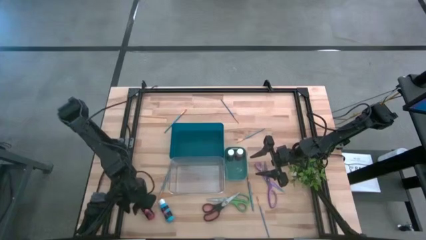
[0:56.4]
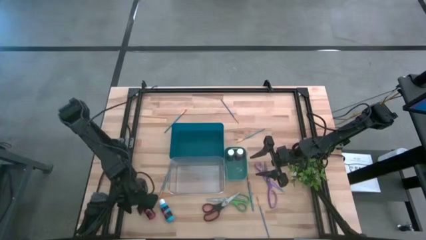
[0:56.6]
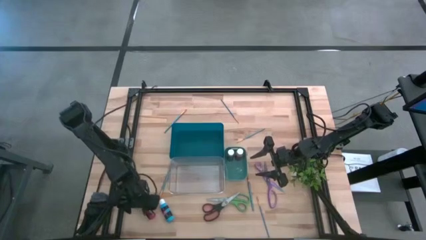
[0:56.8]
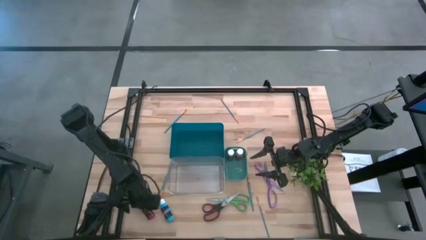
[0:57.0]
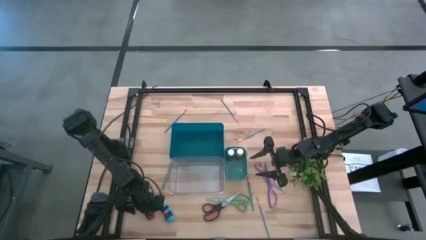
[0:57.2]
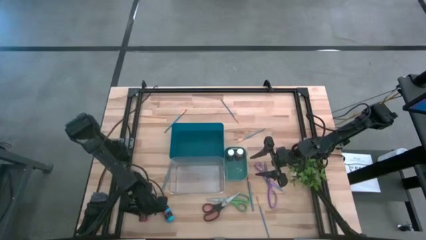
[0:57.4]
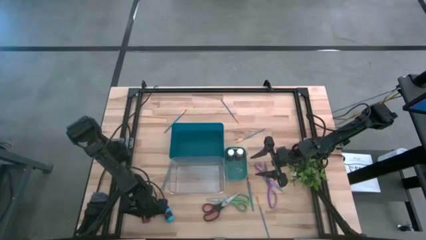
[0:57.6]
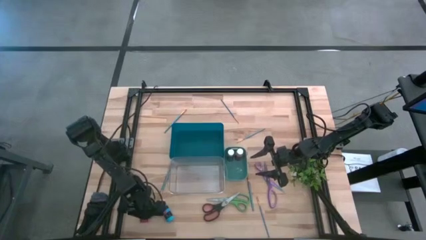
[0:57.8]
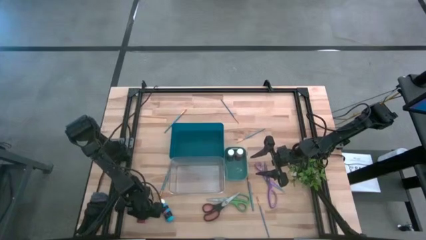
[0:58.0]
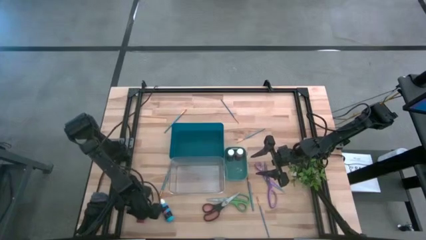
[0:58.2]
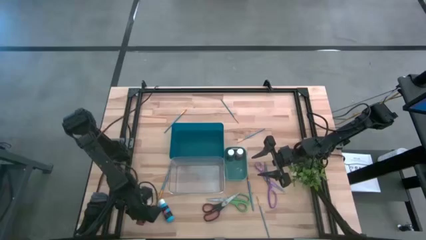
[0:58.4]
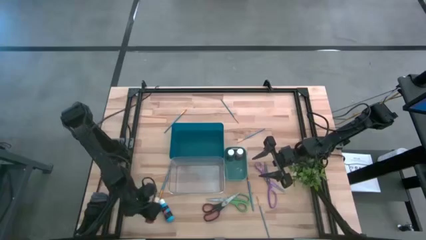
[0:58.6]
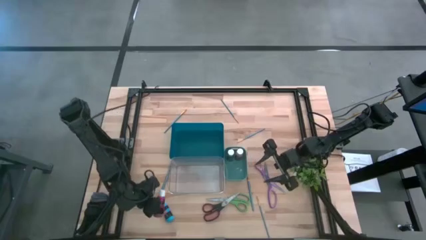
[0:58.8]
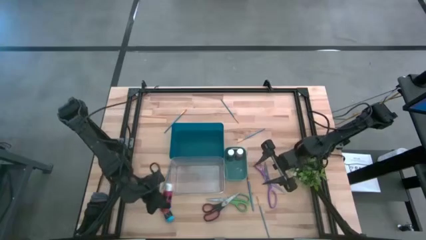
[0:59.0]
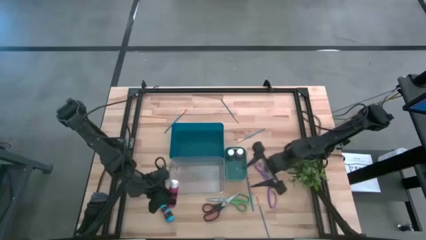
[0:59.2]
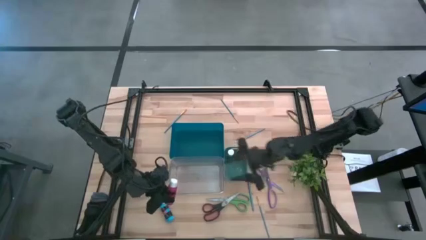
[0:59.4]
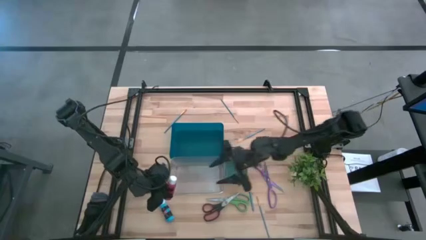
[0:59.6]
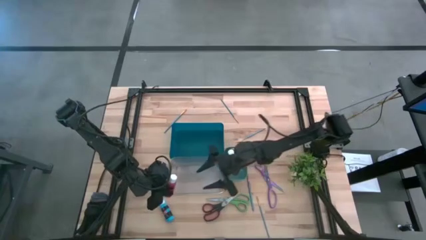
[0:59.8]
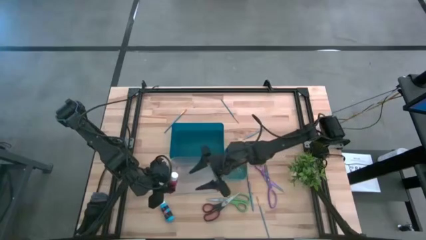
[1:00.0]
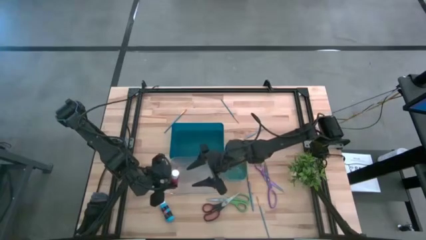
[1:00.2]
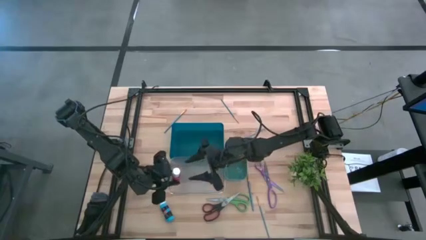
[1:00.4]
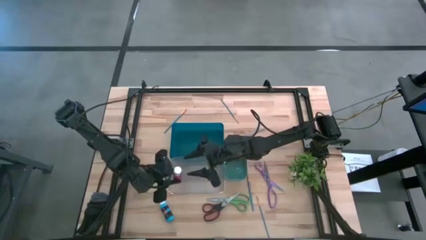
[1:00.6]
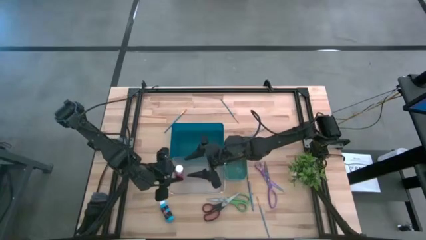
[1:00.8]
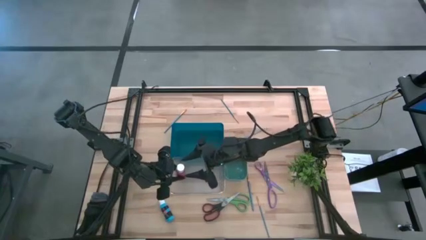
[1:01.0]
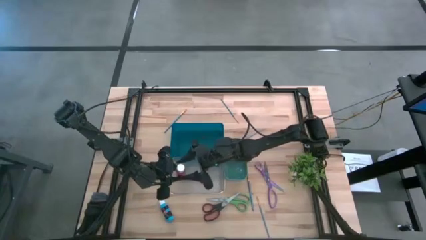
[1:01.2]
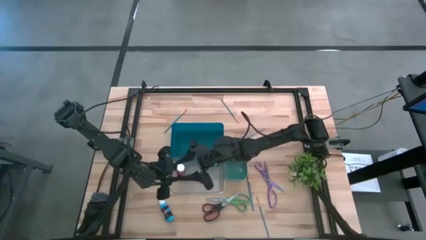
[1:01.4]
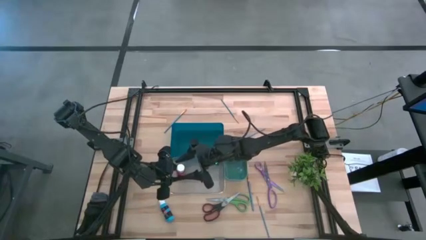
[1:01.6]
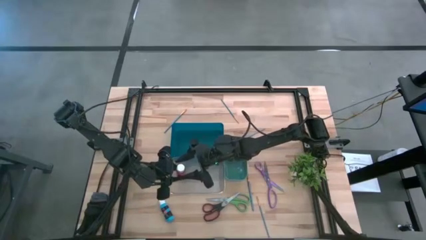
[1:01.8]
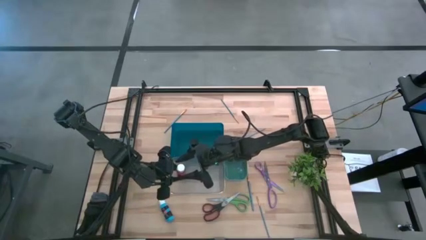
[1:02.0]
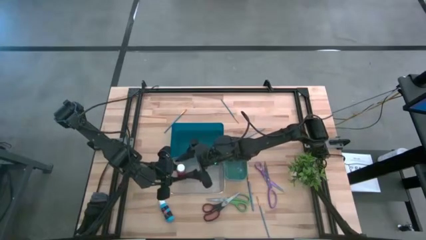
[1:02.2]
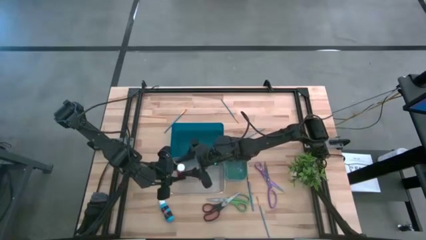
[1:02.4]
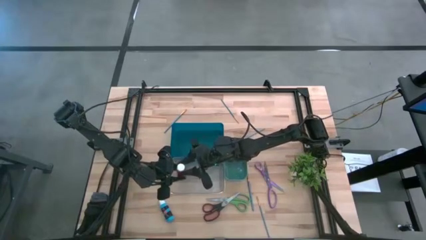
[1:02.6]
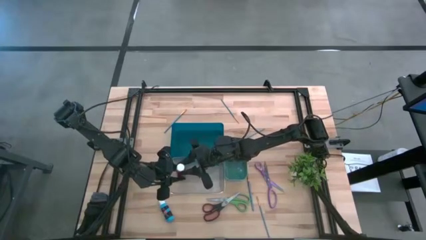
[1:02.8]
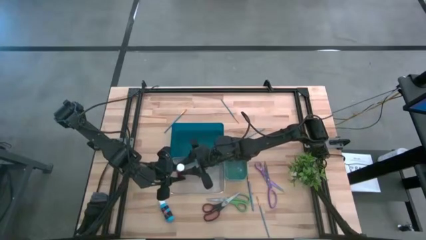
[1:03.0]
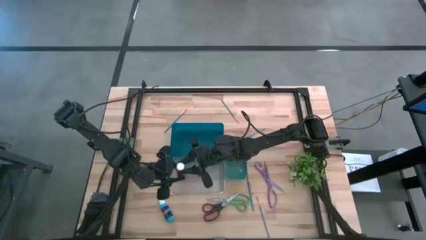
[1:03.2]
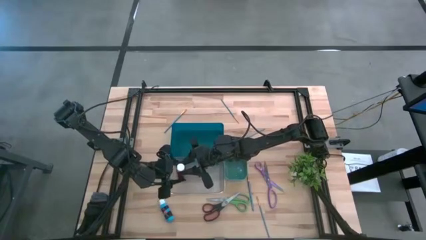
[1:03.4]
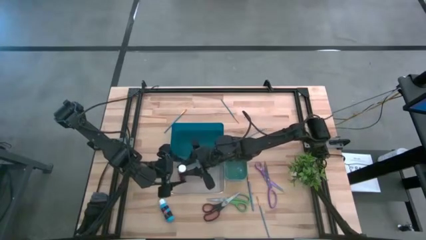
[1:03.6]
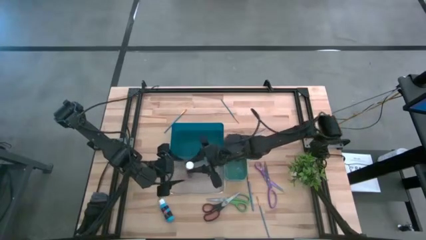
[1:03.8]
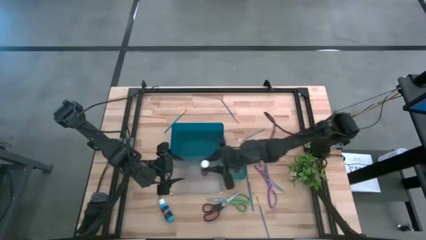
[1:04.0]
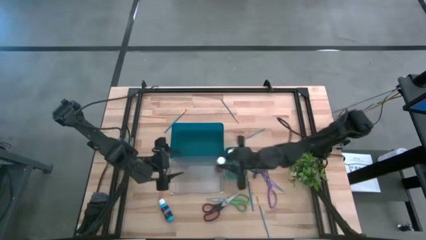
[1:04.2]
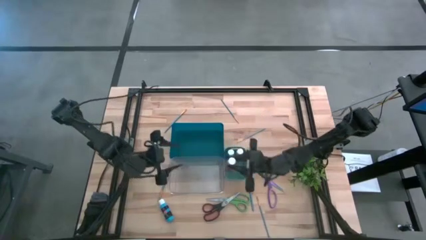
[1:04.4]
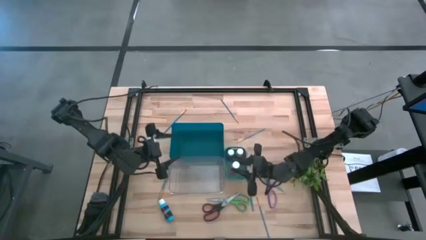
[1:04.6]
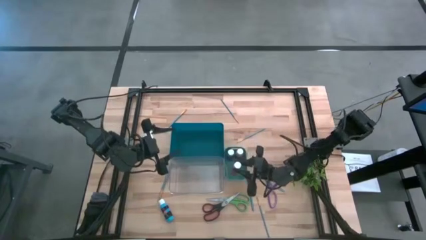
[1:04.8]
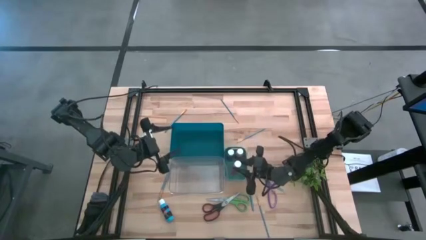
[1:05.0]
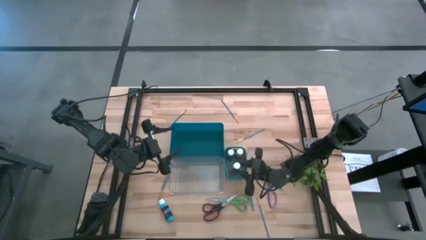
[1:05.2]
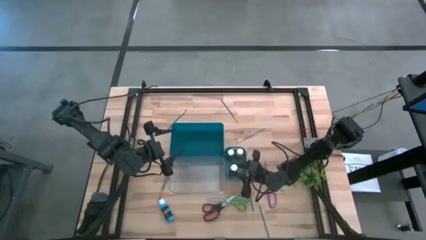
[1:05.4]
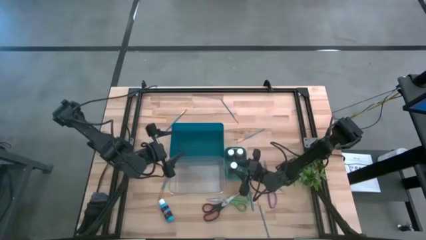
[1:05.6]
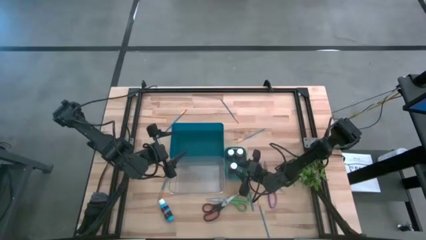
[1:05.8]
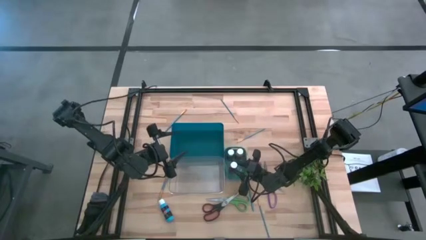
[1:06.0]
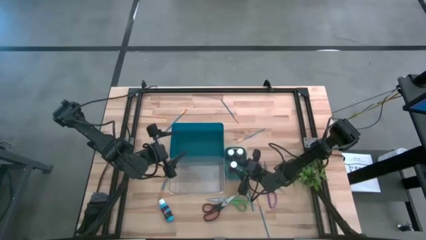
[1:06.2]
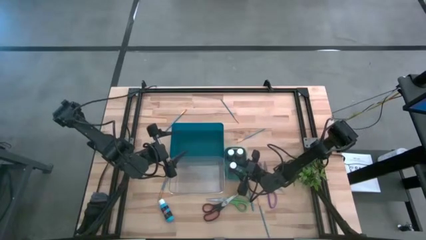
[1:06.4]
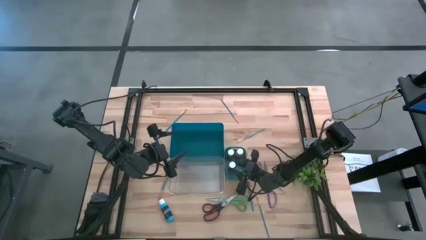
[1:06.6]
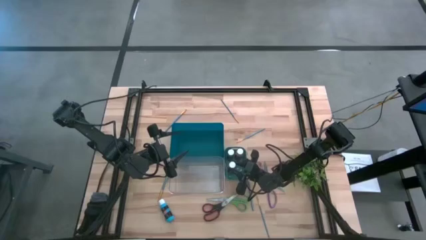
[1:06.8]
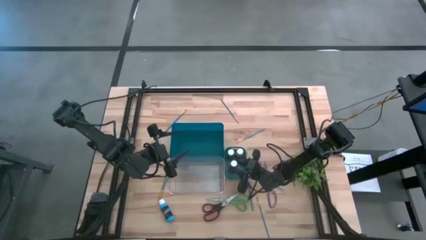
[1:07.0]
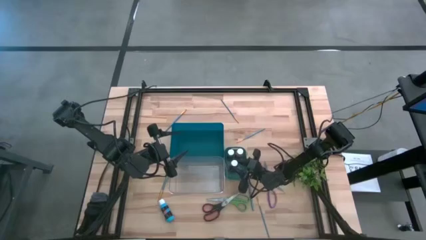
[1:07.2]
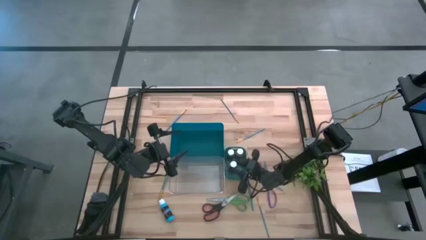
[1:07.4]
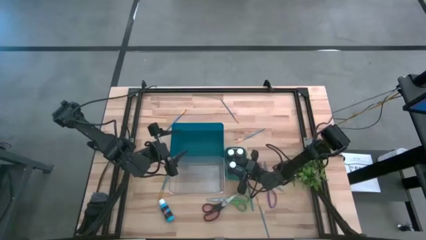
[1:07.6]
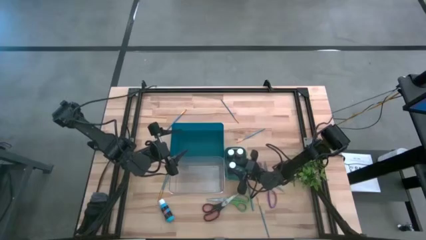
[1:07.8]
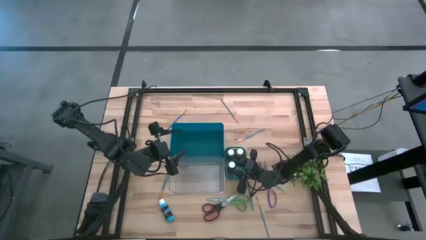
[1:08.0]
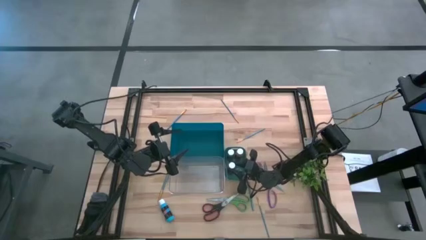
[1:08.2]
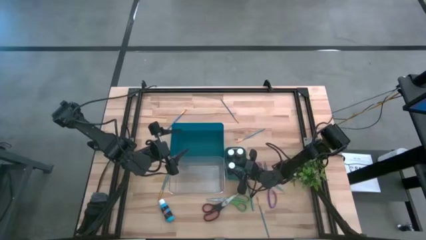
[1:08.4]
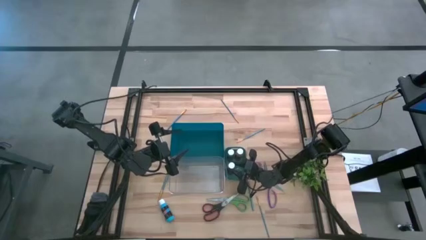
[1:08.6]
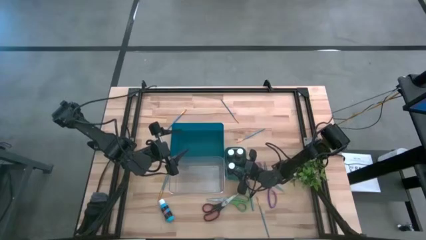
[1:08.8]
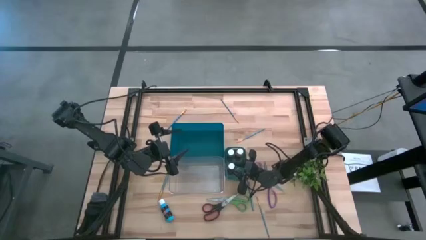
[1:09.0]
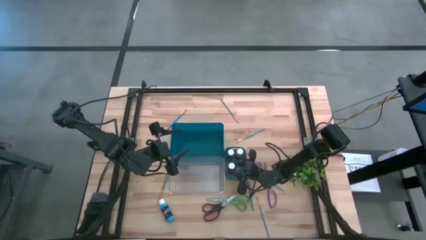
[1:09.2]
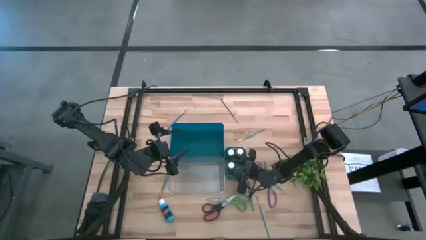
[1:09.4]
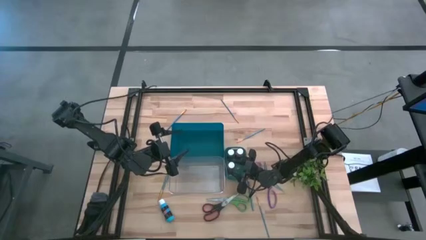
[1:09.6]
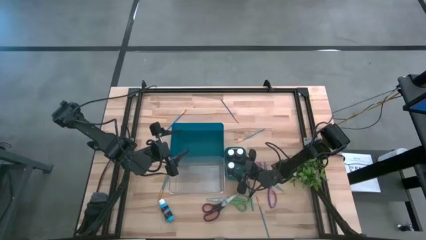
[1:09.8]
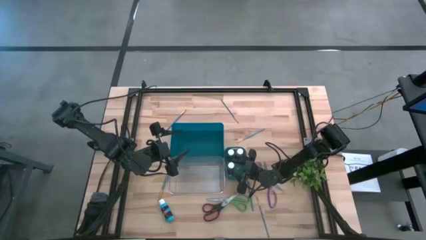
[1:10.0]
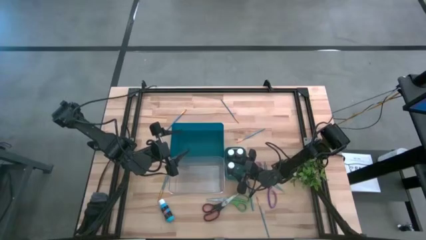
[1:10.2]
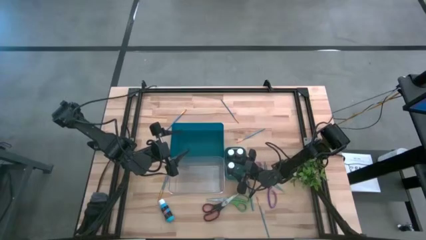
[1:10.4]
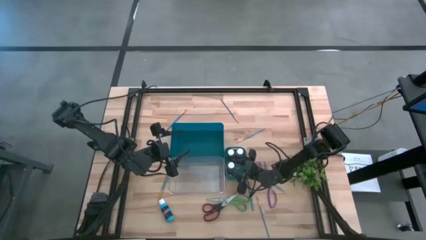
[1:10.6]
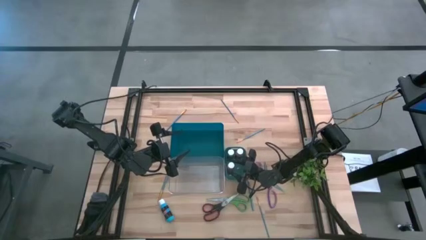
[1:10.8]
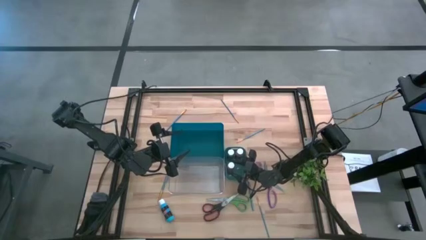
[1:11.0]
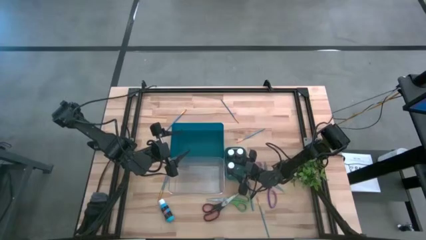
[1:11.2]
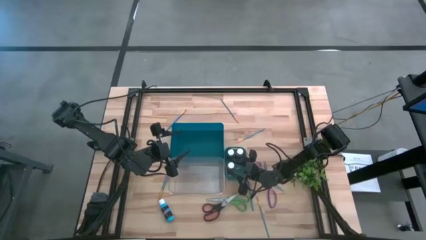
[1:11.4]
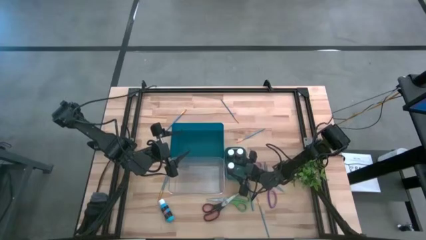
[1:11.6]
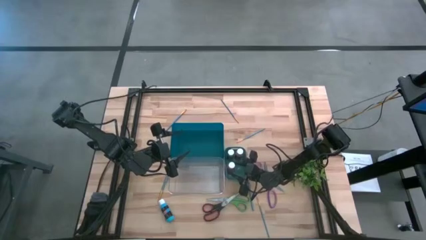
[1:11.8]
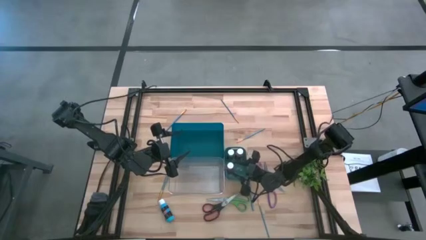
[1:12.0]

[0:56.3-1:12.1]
Task: Pick & Place Paint Supplies
Put the red paint bottle into the green bin
